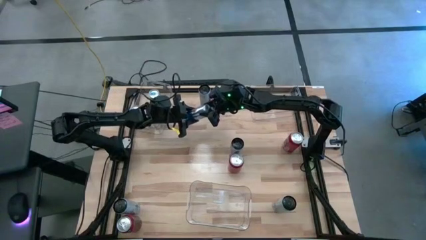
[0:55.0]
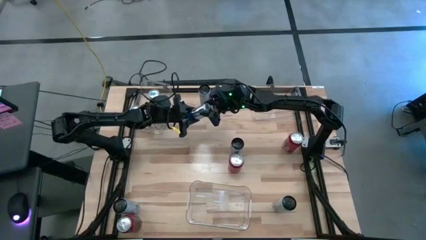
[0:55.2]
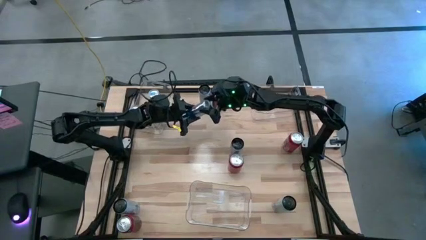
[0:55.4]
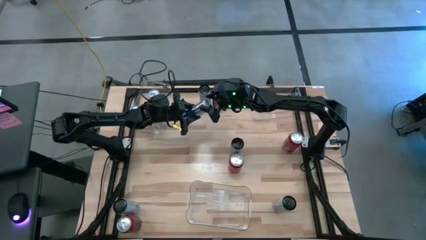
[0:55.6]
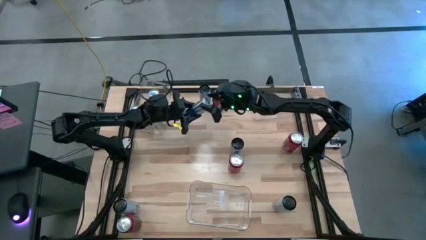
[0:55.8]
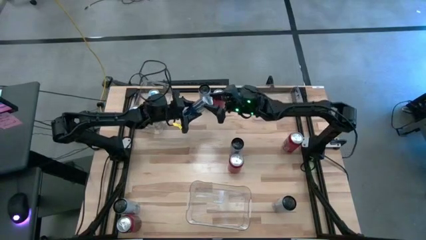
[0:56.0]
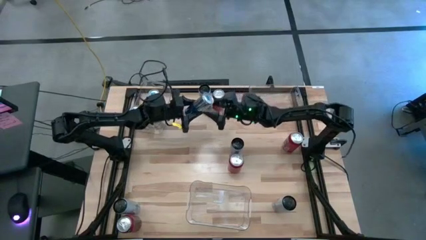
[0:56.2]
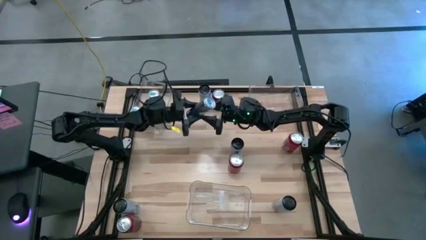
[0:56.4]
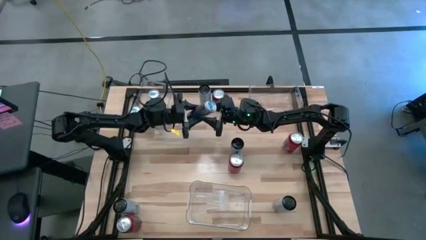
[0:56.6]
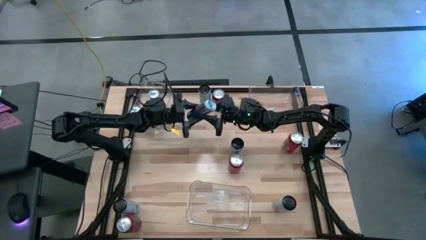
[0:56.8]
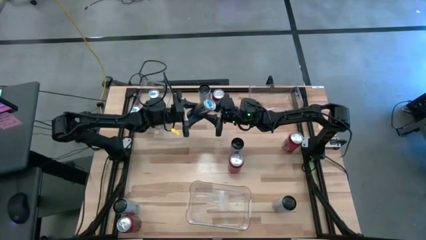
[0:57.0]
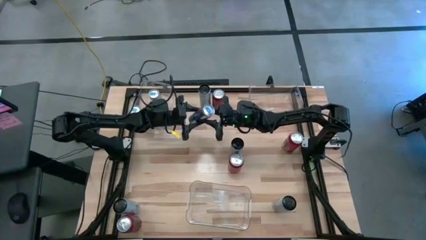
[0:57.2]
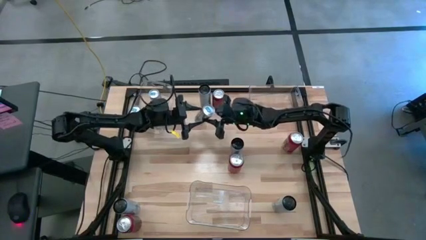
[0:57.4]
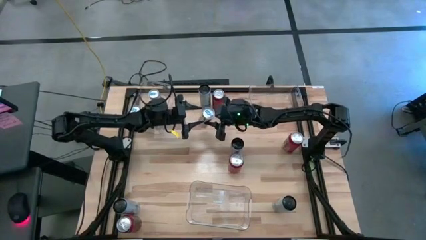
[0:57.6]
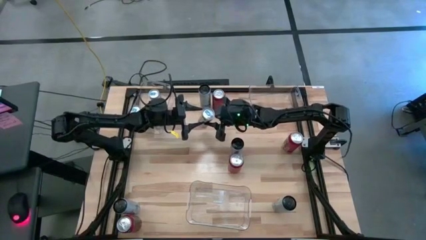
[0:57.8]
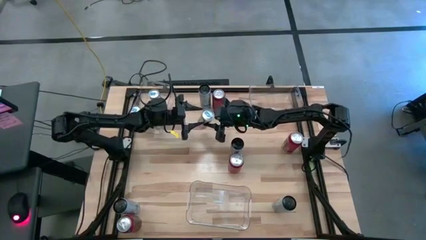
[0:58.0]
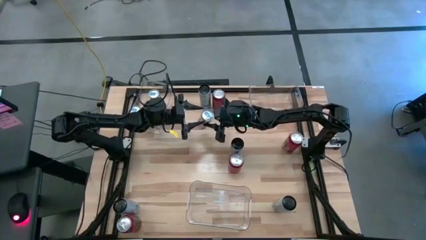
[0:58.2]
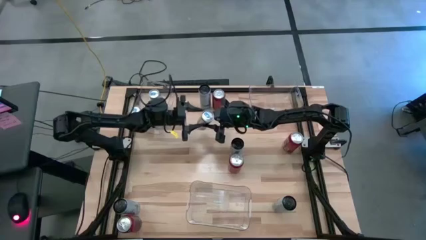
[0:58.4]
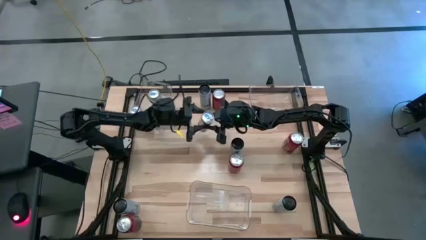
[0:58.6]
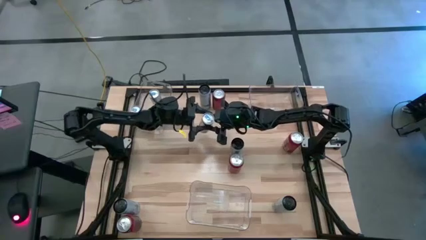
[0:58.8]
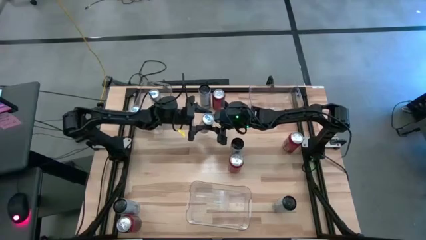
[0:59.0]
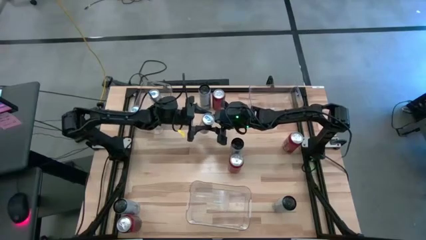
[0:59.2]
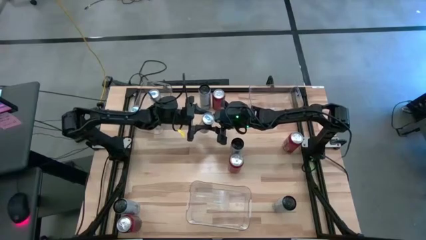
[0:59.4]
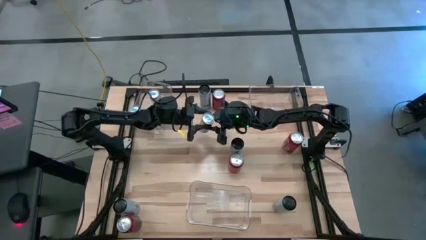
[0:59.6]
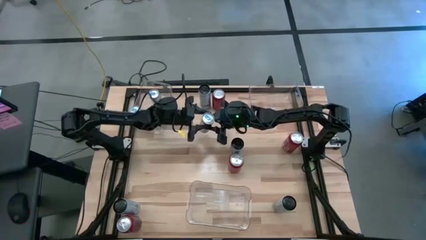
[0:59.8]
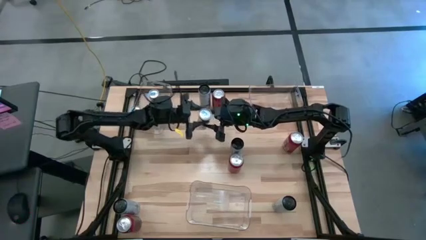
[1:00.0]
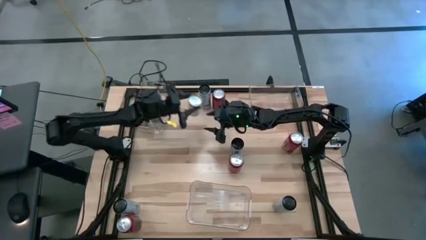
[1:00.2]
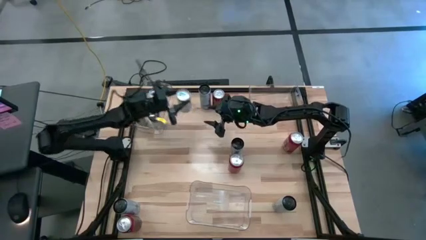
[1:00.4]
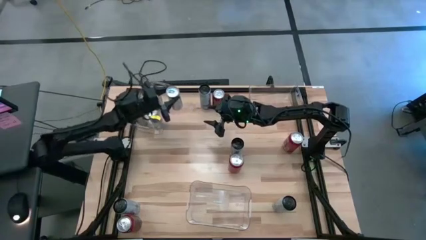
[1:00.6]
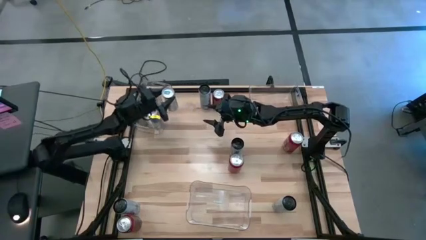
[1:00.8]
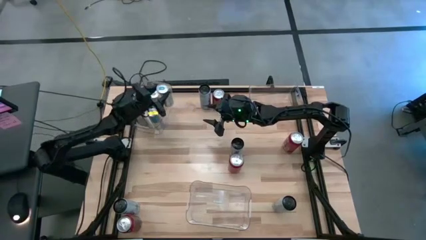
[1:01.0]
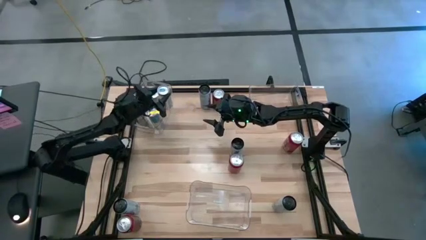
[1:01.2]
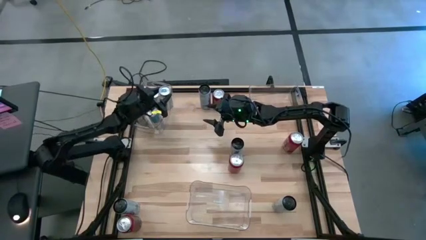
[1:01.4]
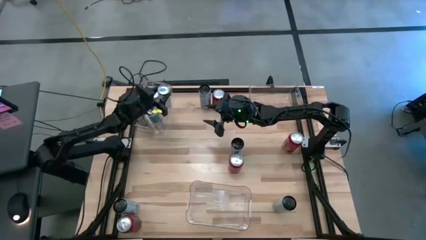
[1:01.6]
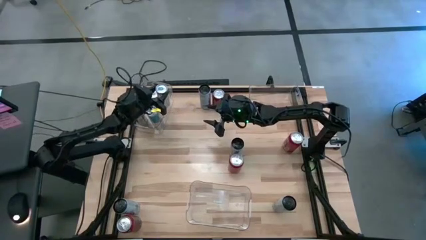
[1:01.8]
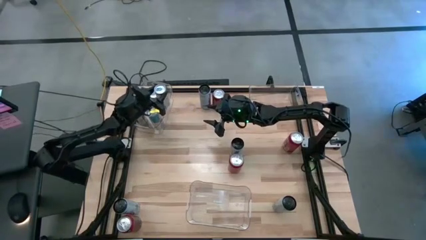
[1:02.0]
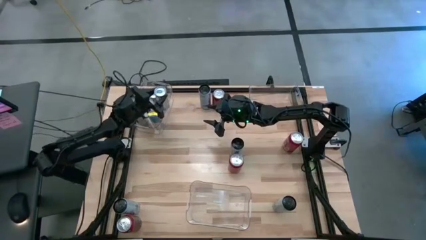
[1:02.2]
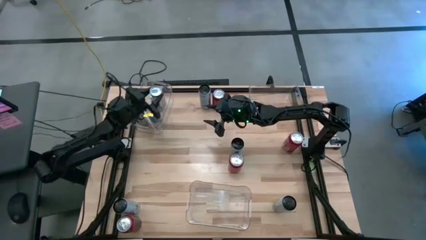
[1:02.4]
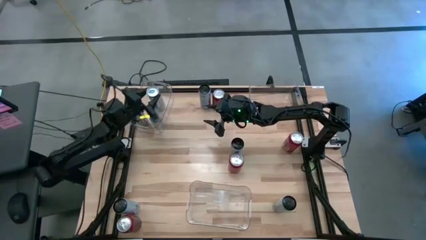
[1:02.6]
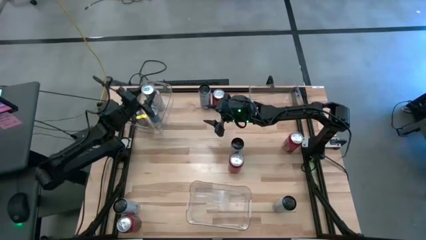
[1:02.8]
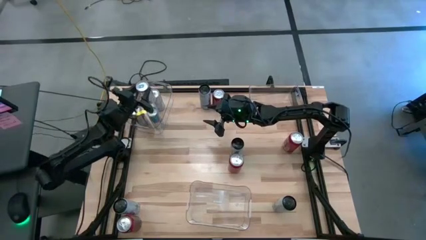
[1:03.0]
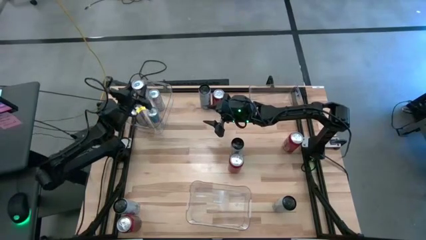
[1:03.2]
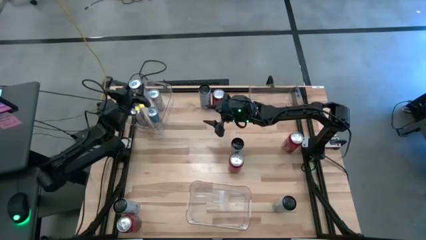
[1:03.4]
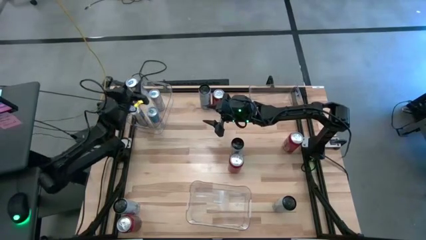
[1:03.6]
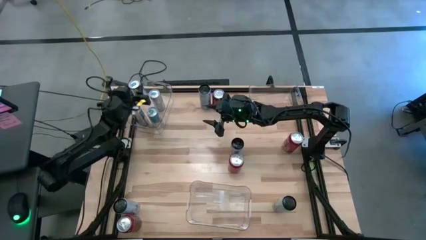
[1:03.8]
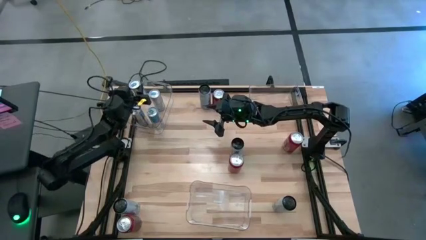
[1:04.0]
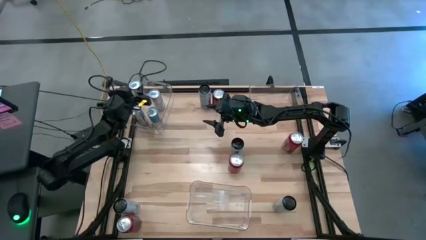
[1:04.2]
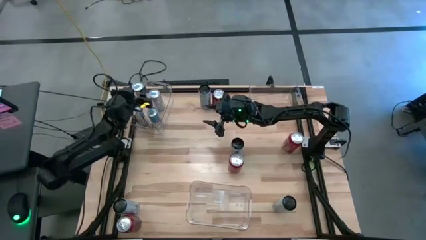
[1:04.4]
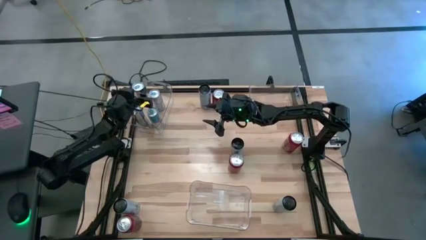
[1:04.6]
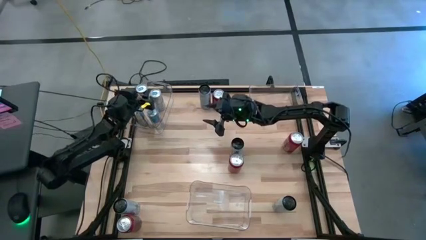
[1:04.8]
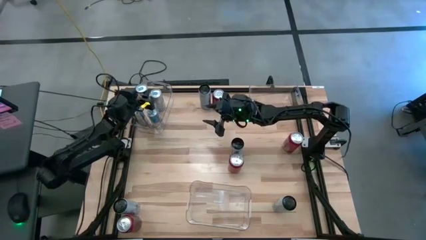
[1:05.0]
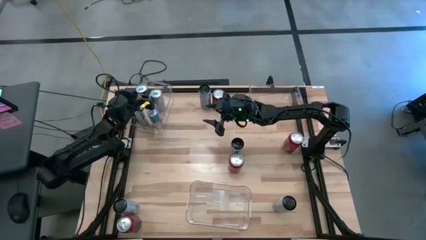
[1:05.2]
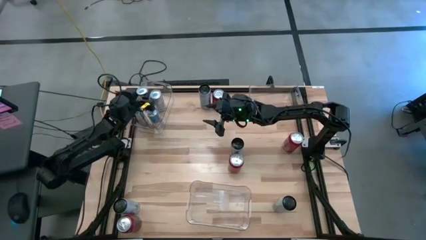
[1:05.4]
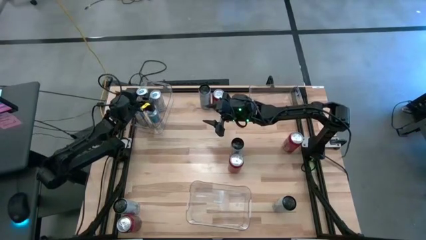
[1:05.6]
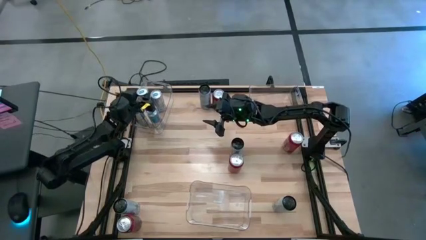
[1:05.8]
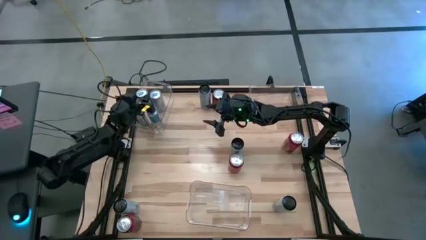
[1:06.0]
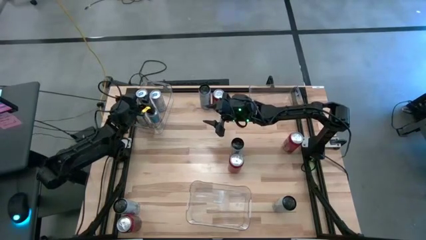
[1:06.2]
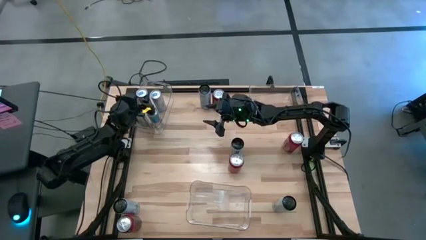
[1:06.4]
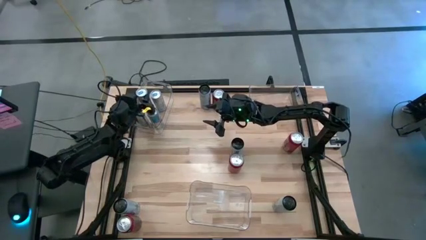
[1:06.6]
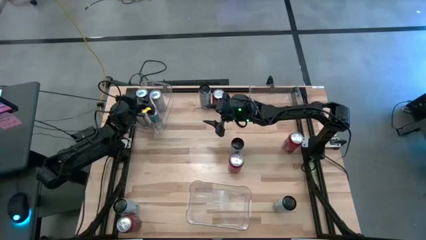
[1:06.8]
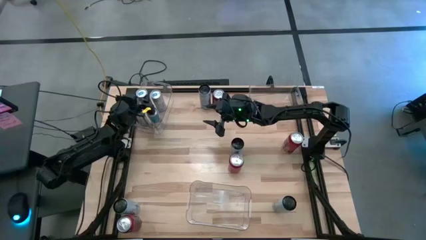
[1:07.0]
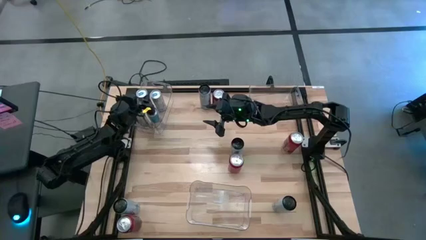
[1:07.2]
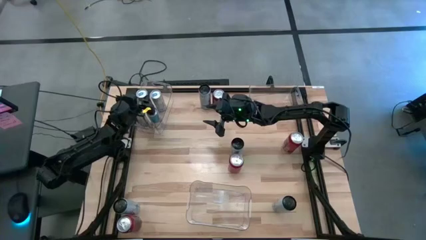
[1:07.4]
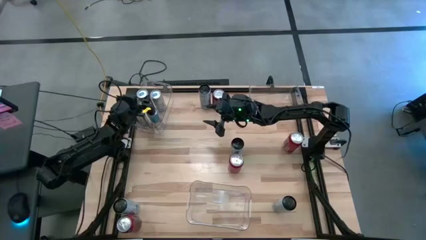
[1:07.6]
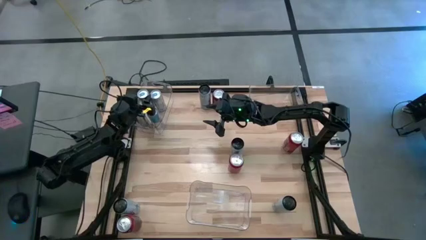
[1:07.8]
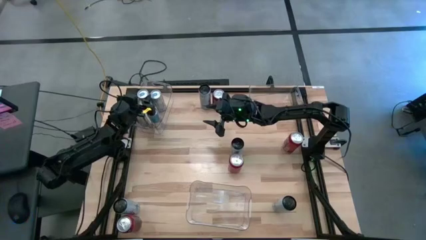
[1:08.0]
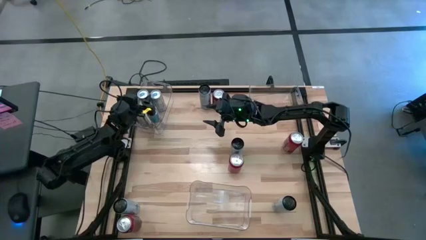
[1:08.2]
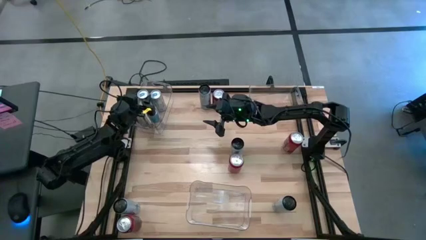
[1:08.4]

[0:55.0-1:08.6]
Task: Sort soda cans
Put the blue soda can into the top left transparent bin
